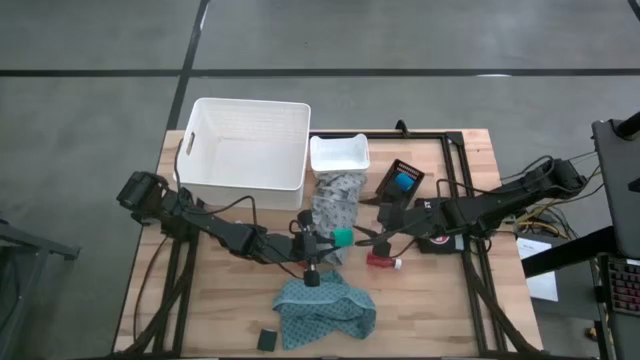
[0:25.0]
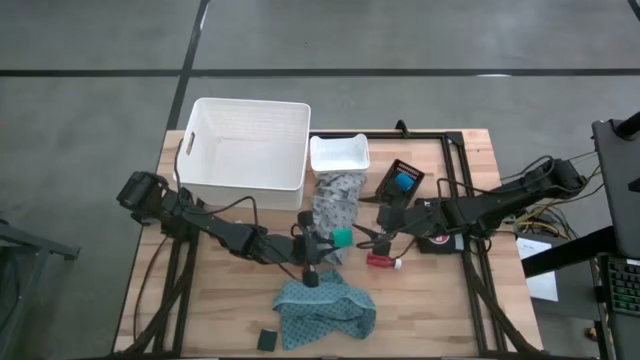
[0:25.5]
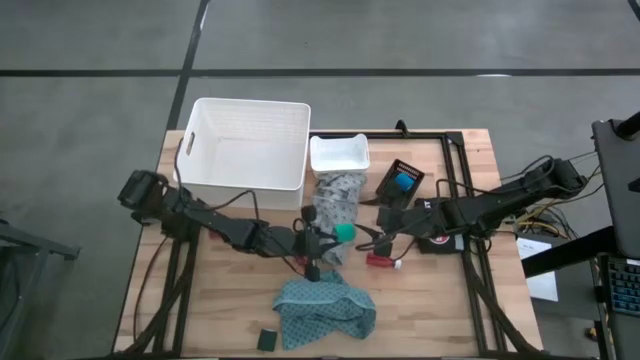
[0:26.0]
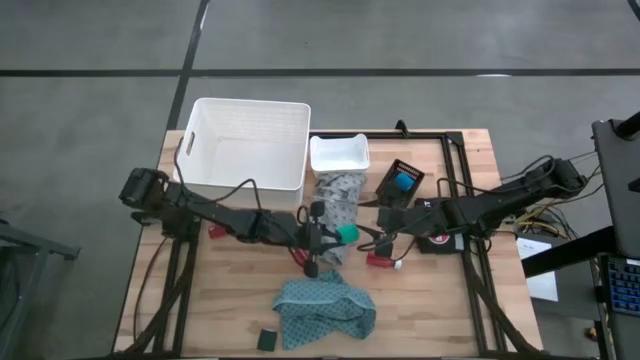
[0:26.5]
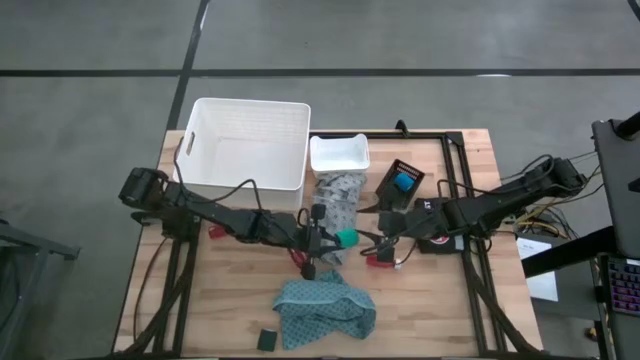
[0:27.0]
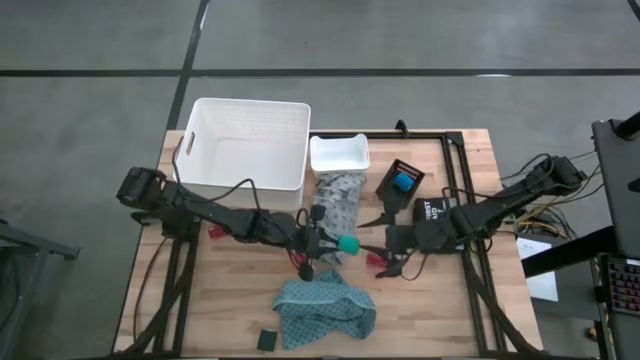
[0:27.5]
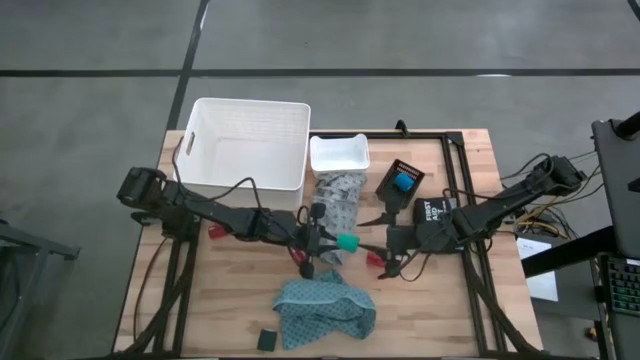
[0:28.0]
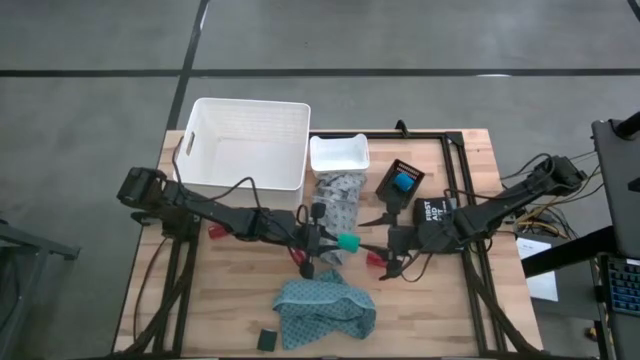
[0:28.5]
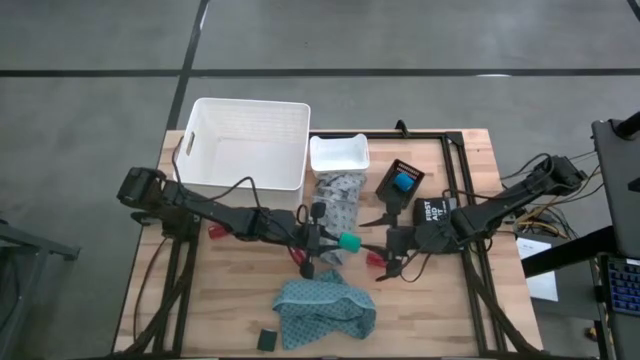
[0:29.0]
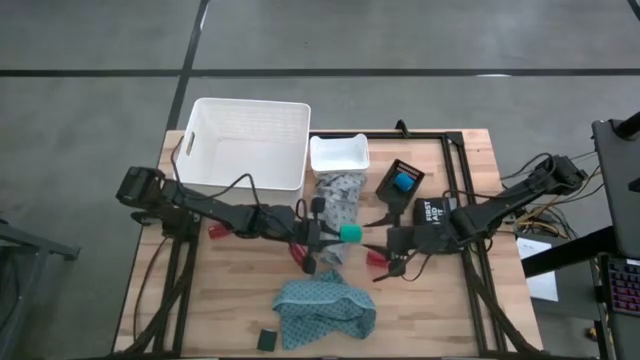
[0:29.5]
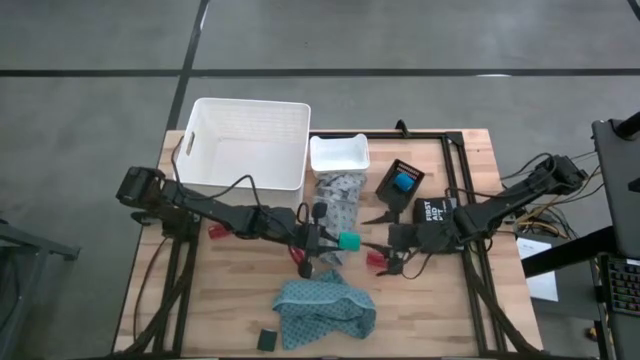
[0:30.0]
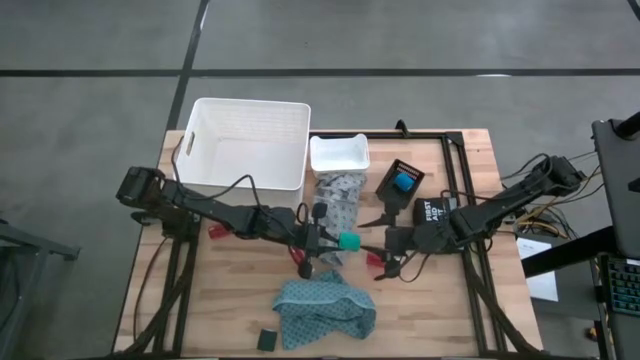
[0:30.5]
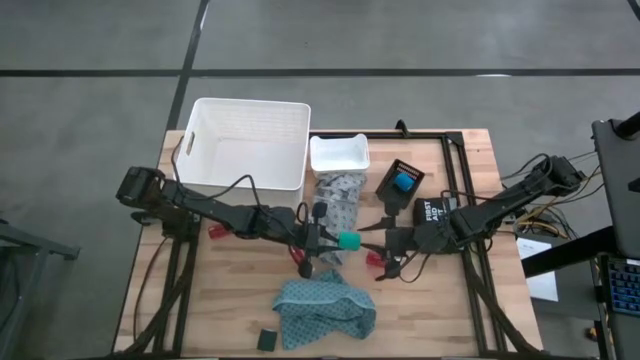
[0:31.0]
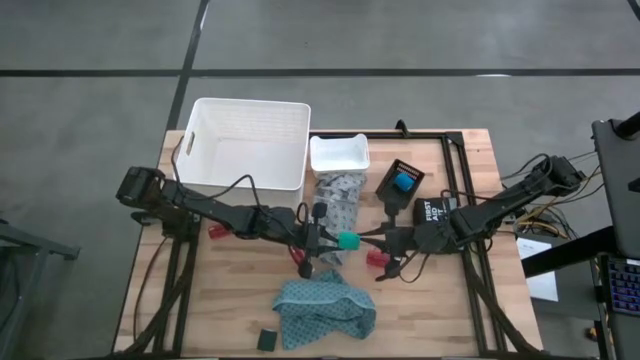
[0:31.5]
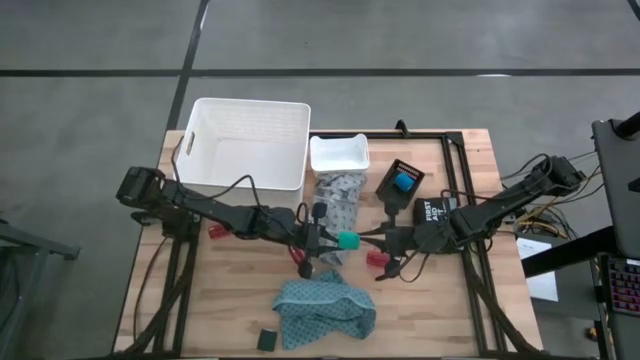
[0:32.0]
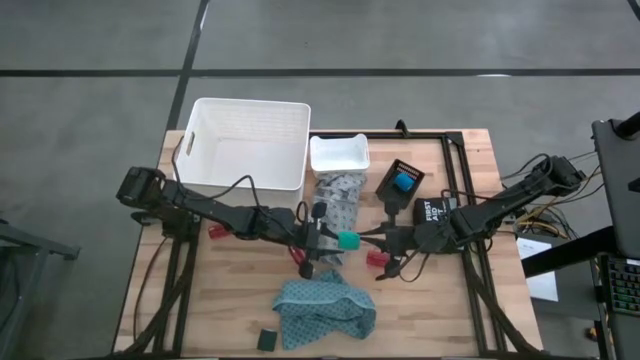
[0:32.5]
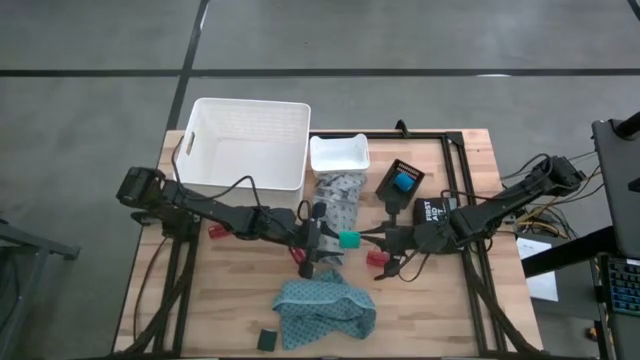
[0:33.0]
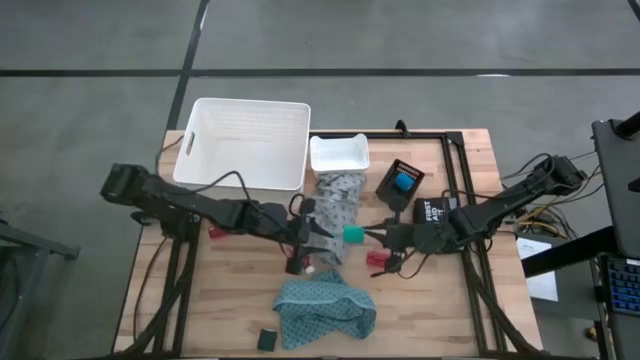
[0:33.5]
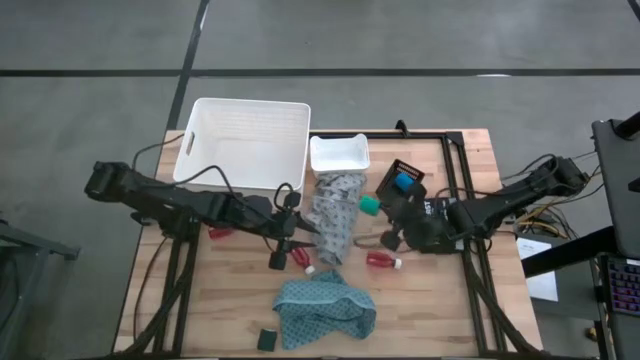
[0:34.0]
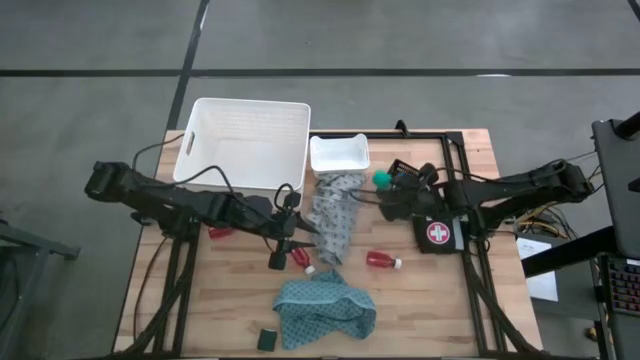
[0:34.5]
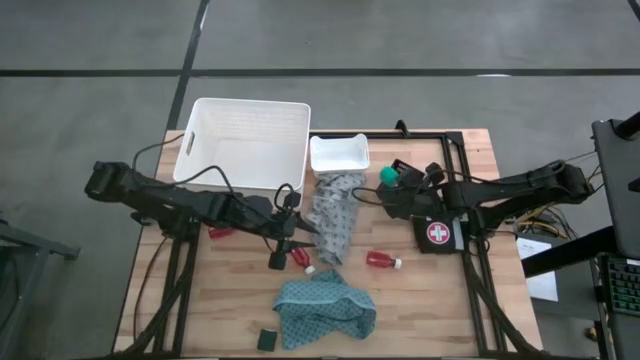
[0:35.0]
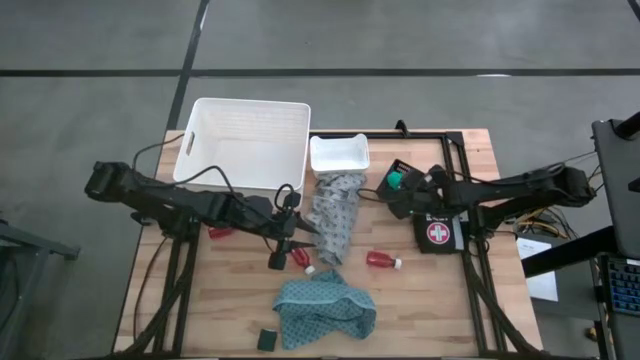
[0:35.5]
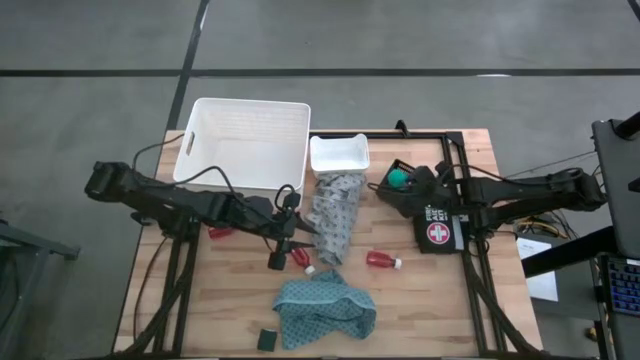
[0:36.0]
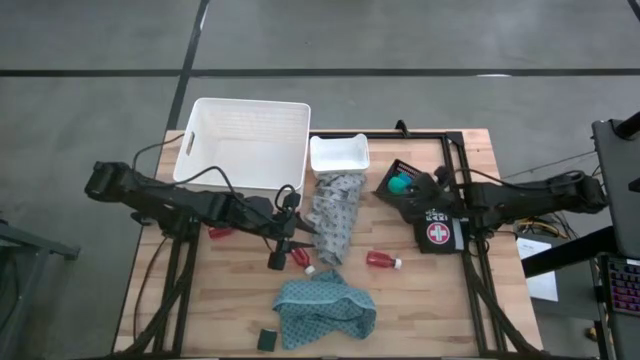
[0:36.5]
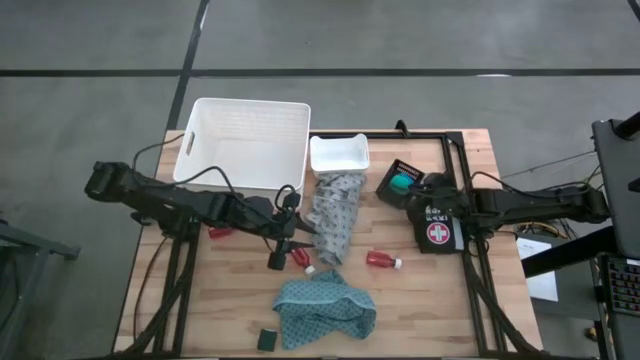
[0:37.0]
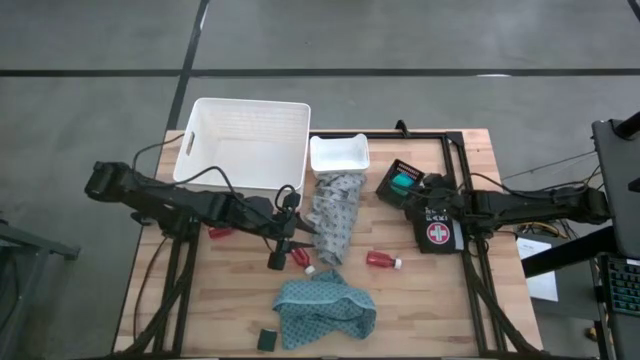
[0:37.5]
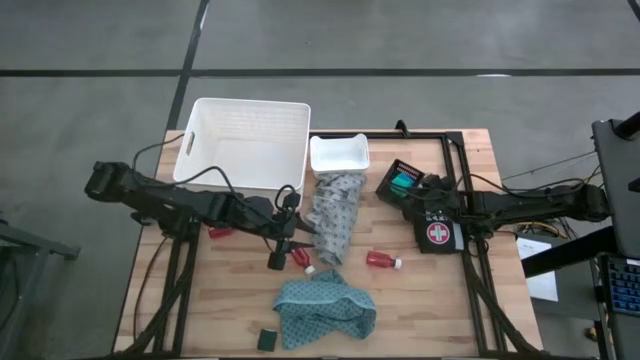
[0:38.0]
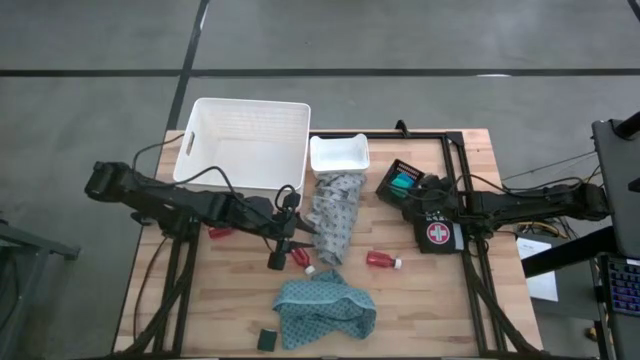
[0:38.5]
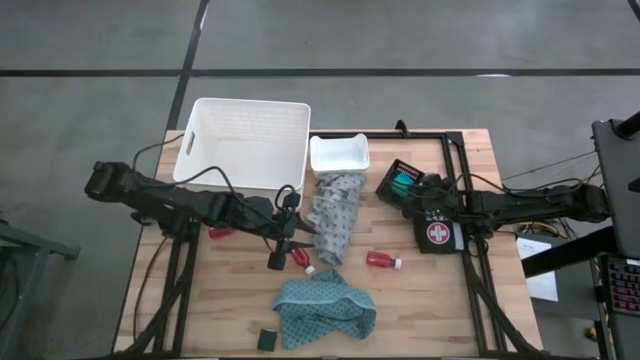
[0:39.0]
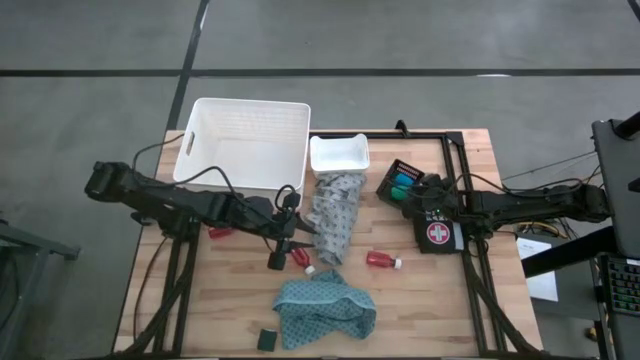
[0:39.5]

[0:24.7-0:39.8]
Task: Pick & Place Medicine items
Put the light blue bandage into the black bin

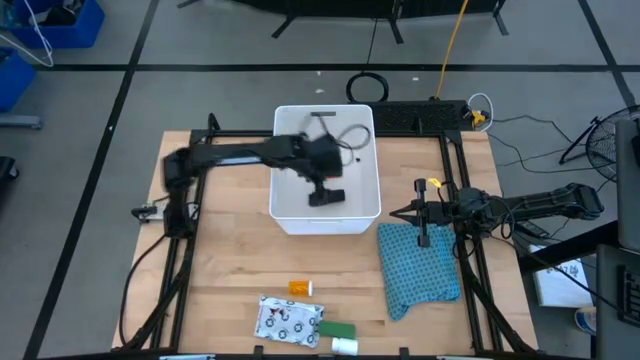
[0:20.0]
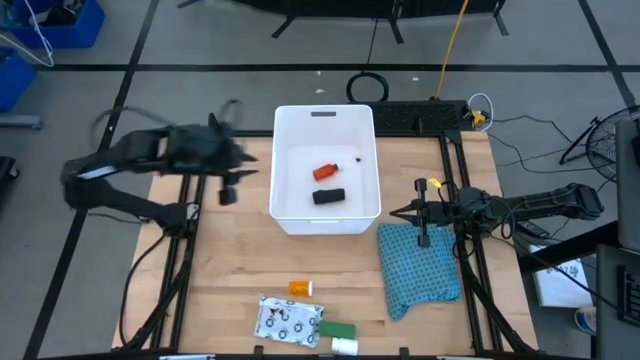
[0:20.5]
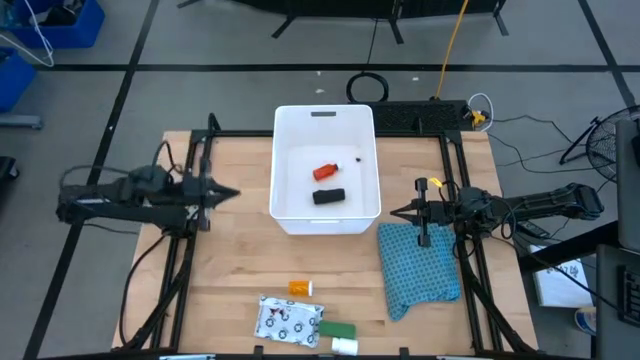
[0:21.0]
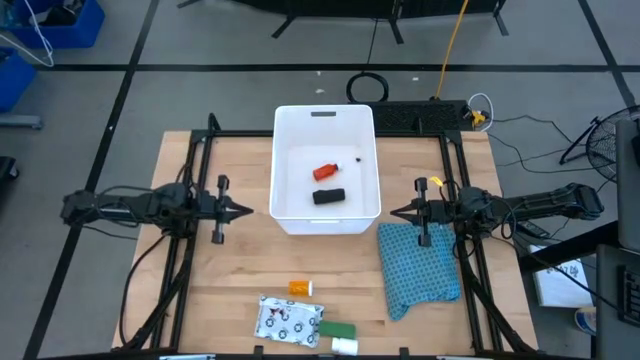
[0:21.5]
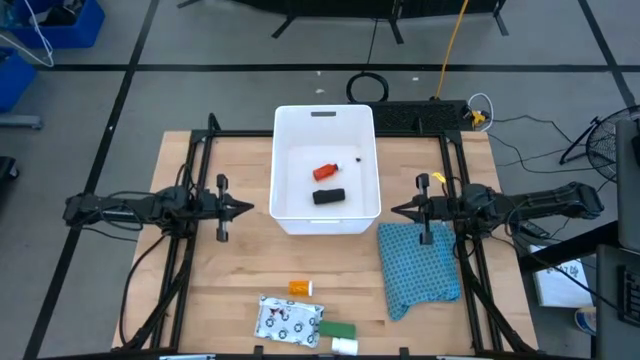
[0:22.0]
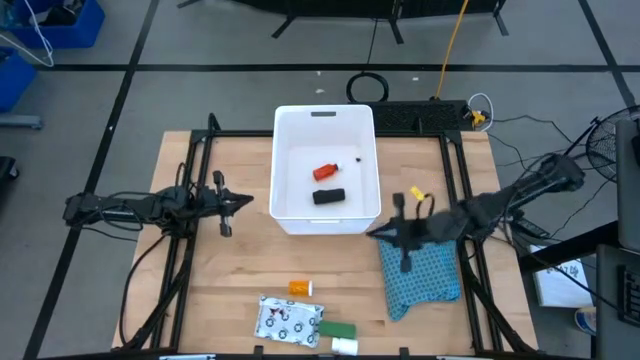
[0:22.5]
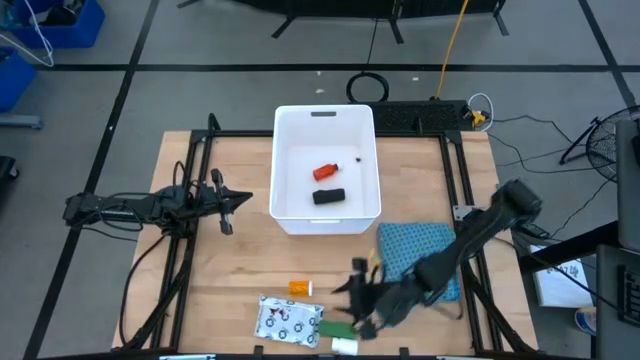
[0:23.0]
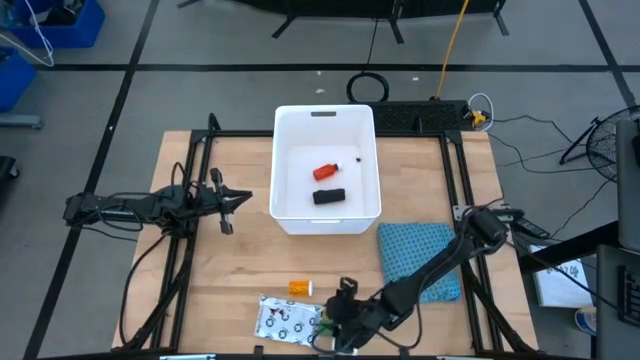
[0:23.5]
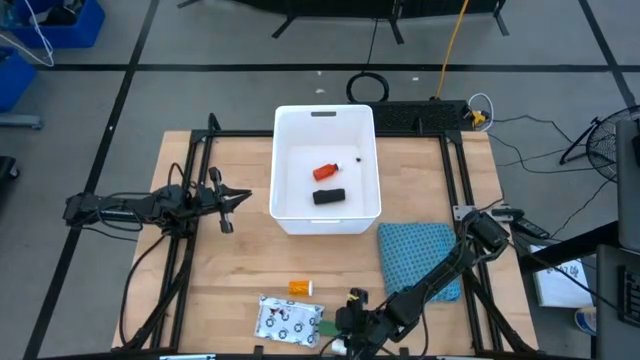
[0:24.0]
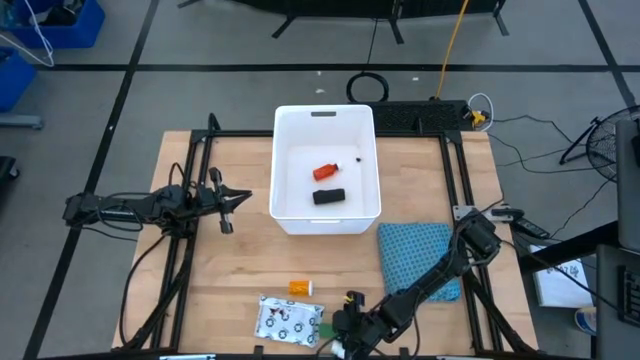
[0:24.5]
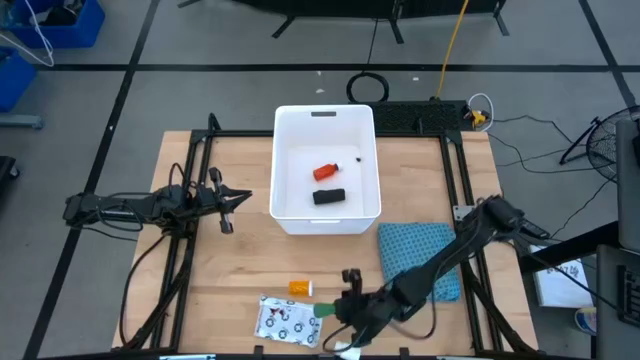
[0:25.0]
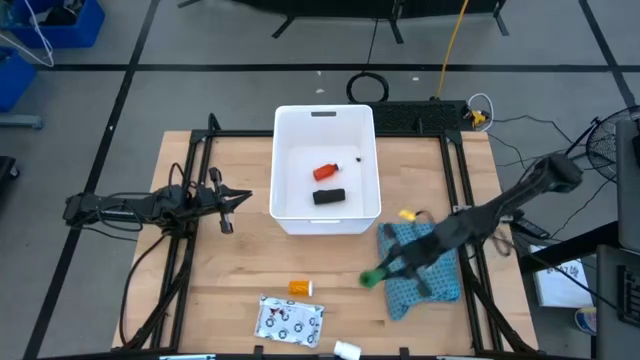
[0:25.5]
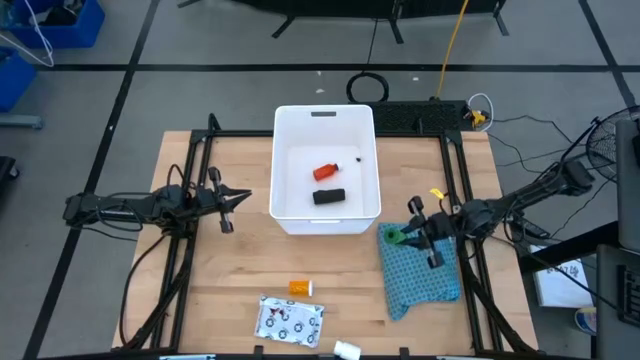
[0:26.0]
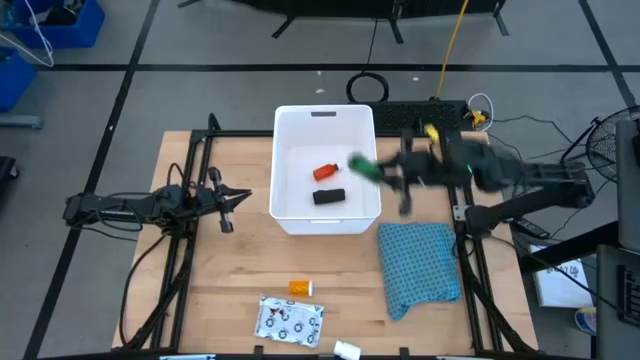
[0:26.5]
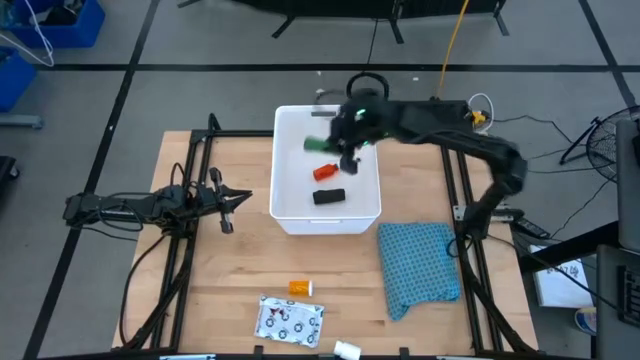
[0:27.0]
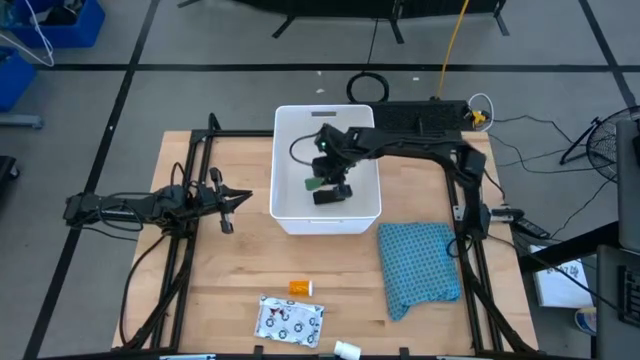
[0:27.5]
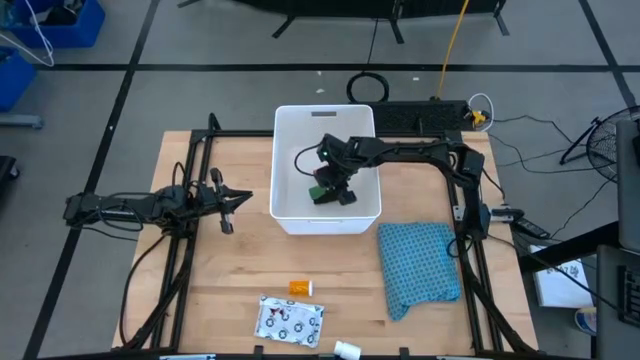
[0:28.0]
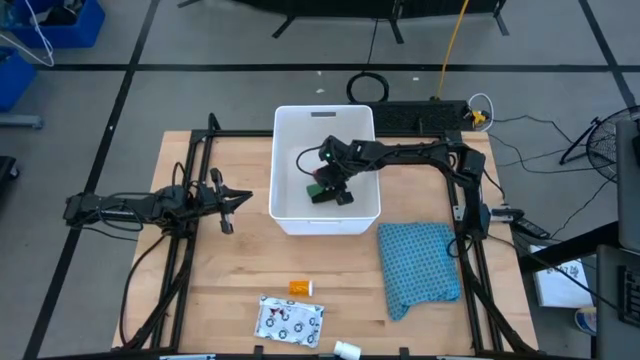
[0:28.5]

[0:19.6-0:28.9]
Task: Pick & place medical supplies in basket/bin
Put the green bandage into the bin
